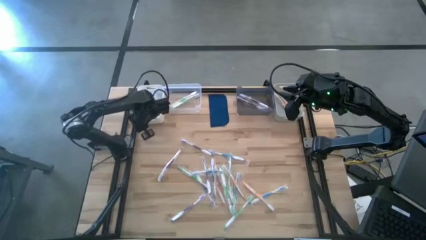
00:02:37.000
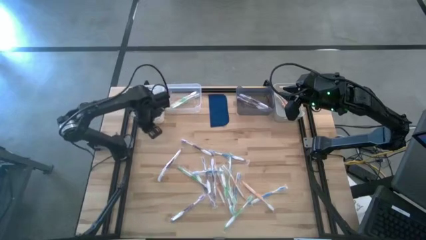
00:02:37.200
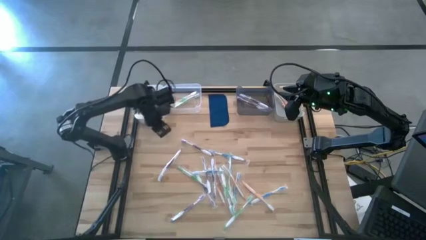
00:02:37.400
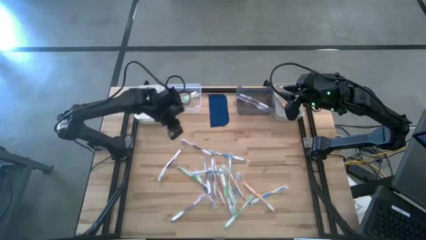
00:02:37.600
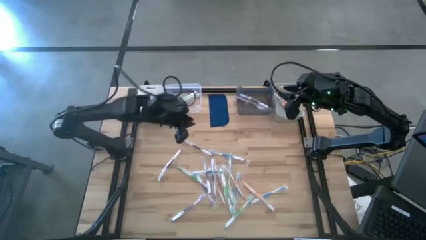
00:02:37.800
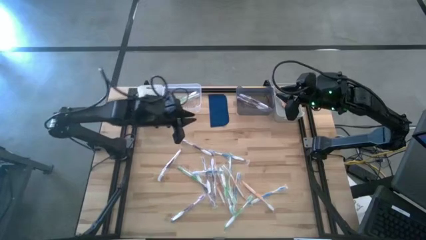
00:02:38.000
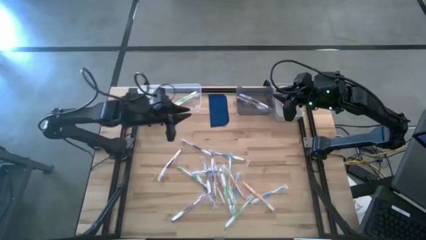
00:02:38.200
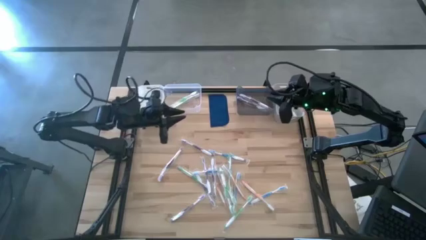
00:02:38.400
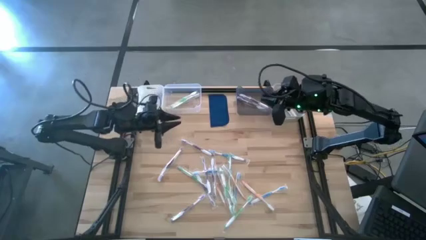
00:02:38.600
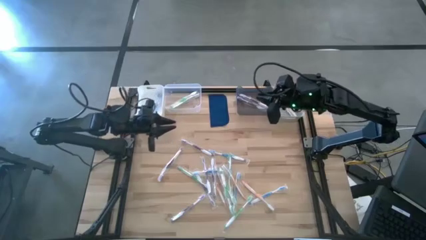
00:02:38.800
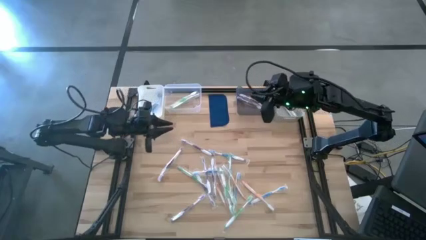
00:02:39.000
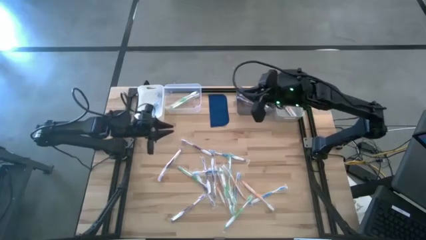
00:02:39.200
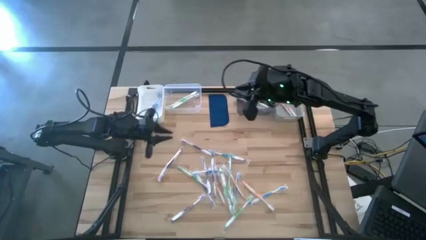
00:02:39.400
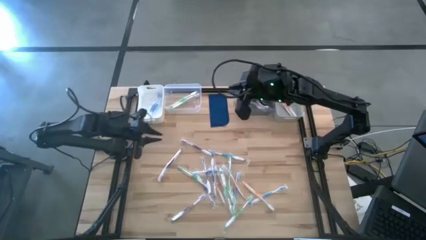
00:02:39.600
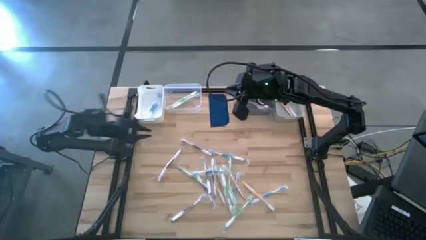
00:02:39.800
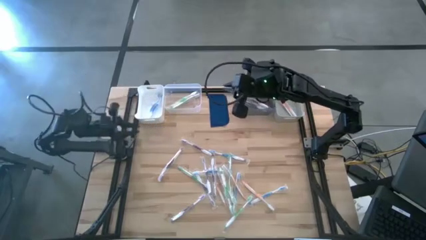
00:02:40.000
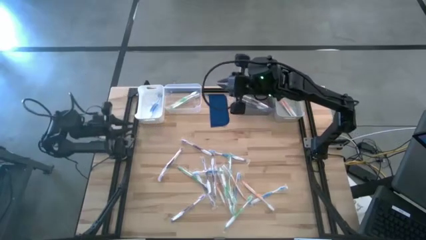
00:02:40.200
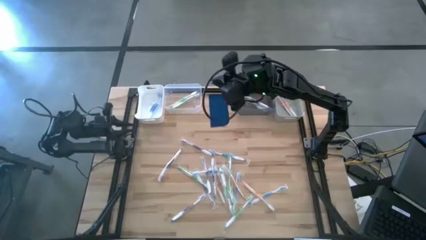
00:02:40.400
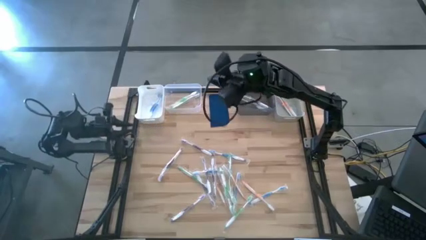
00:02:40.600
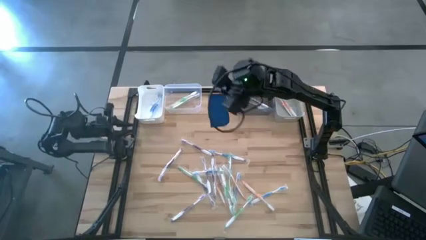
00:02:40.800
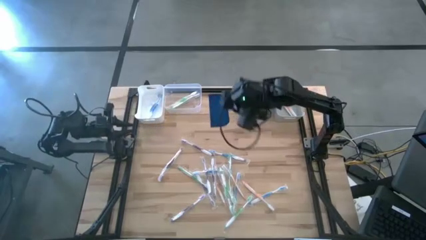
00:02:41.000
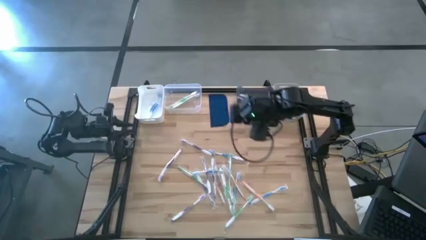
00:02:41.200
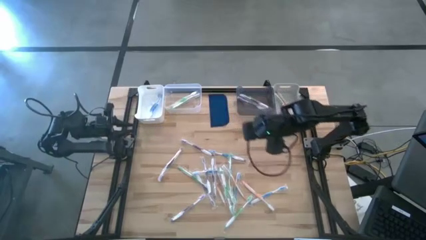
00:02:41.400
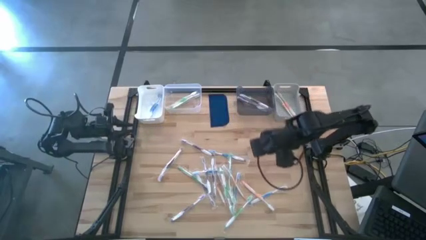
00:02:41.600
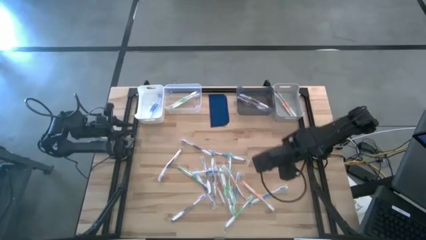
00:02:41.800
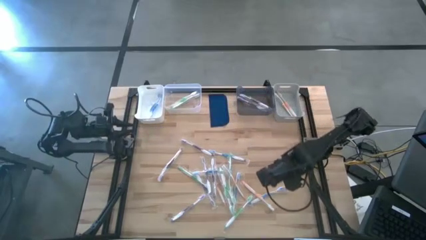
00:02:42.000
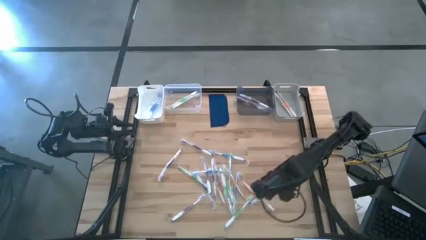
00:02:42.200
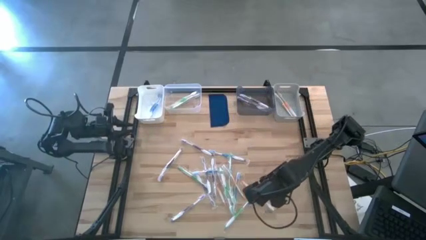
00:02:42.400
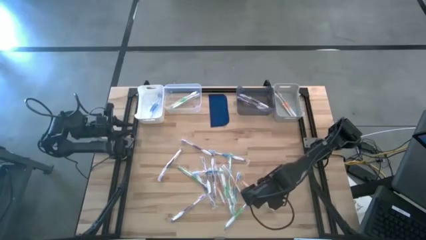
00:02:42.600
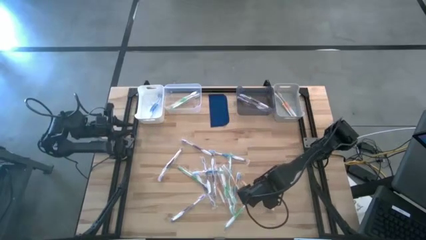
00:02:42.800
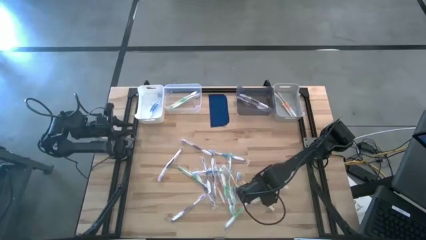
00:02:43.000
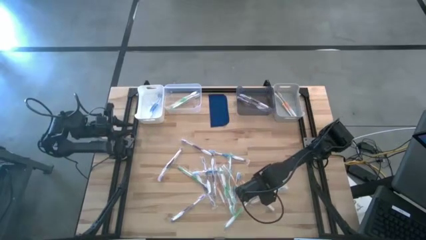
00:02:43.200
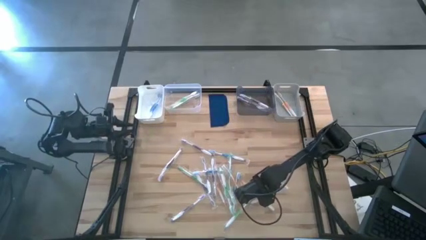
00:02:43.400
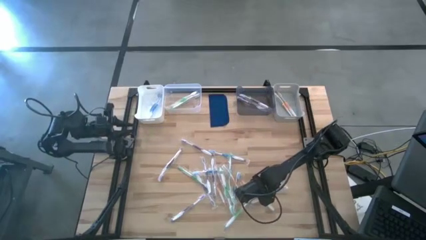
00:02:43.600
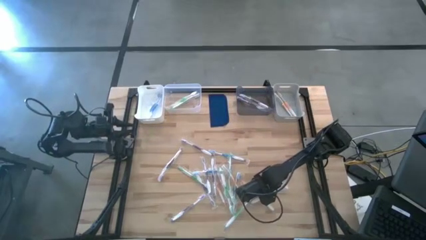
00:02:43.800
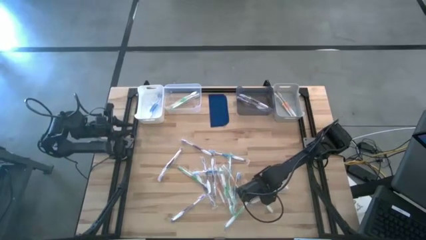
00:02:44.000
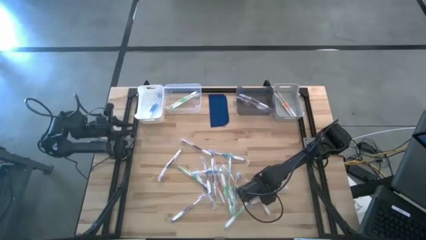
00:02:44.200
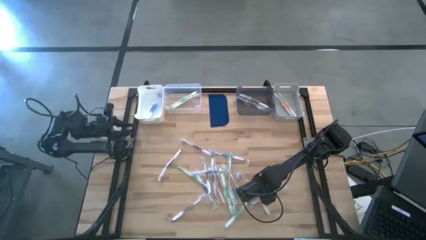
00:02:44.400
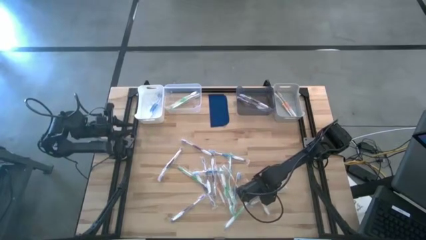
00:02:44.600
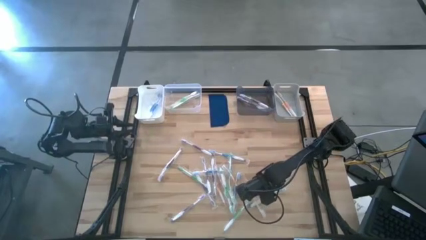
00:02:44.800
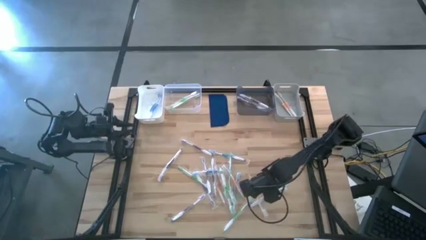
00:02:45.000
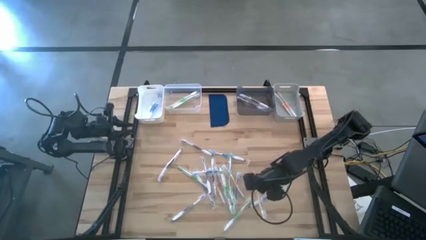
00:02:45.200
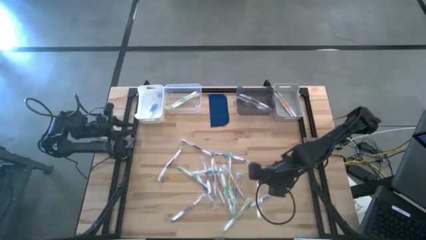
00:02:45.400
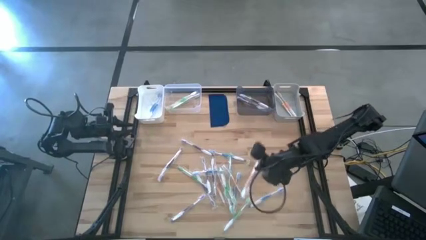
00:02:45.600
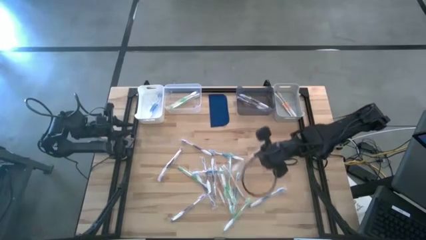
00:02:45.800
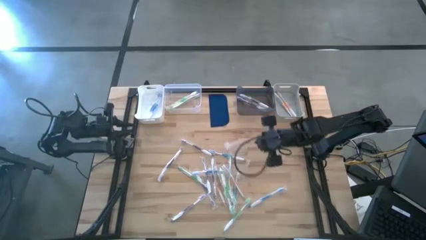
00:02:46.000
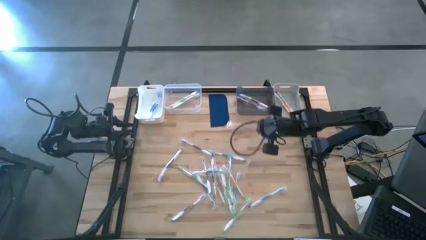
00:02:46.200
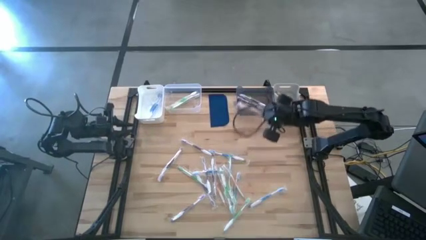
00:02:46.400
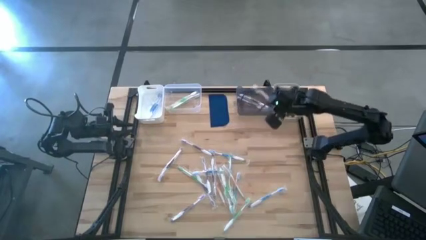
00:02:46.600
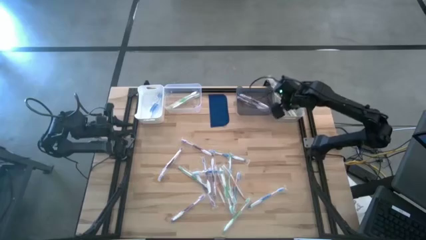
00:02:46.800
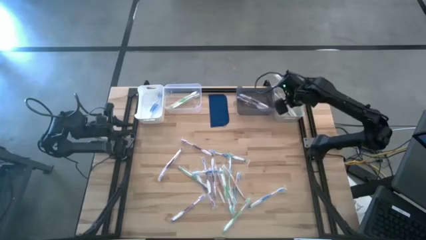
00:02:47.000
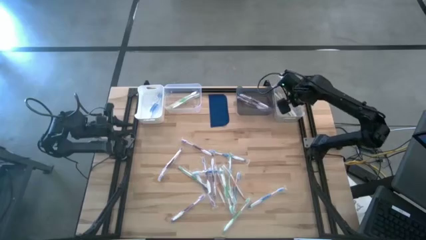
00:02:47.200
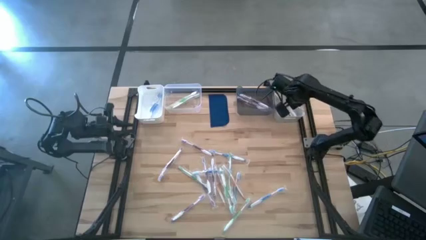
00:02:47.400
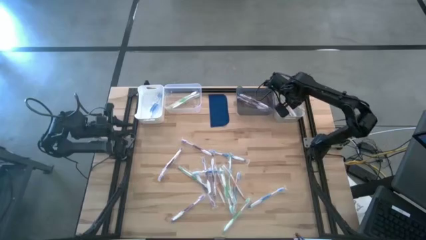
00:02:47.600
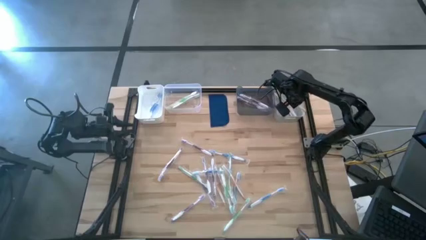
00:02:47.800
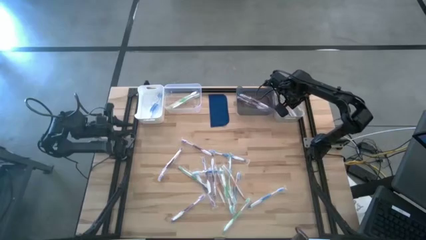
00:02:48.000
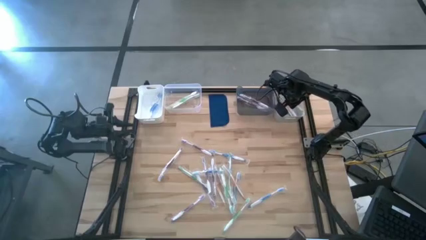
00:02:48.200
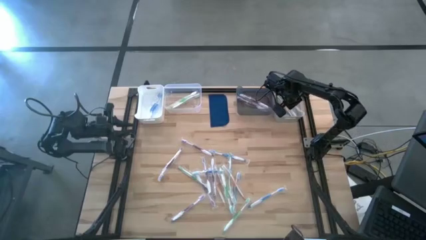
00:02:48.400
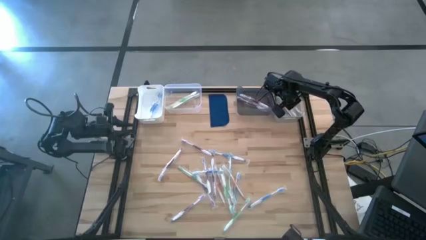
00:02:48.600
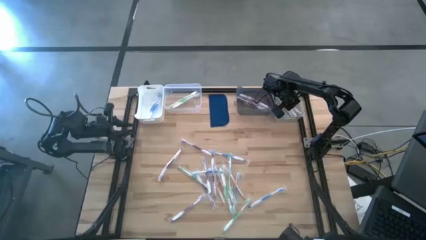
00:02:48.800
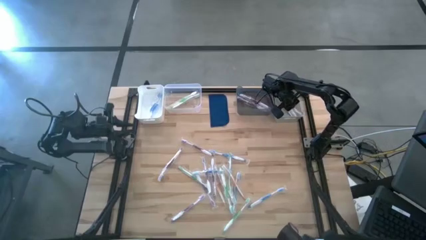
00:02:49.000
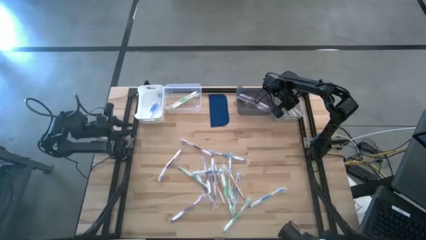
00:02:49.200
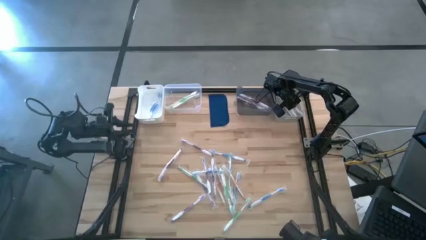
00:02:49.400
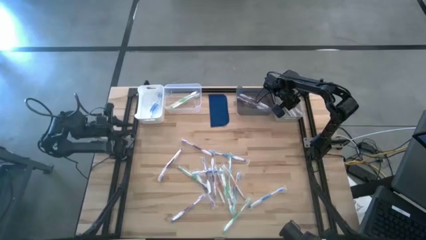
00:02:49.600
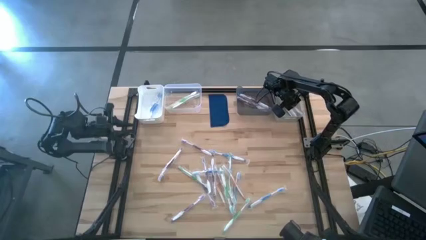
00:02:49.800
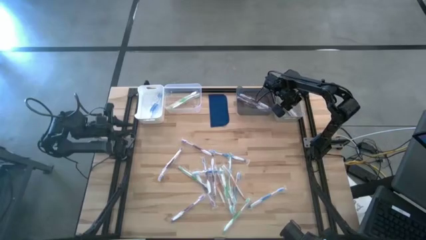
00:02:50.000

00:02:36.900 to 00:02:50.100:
Task: Pick & Place Toothbrushes
Put the orange toothbrush into the gray bin

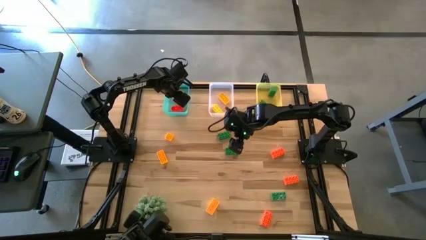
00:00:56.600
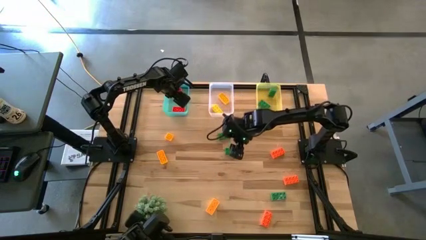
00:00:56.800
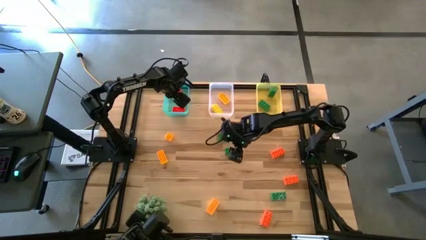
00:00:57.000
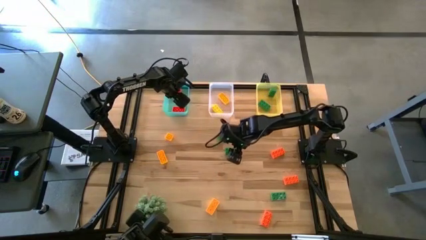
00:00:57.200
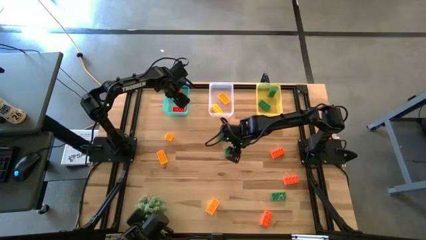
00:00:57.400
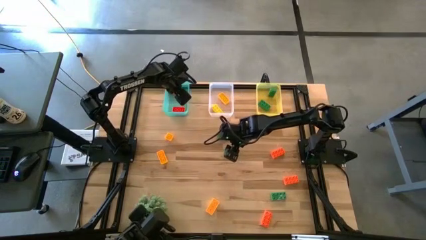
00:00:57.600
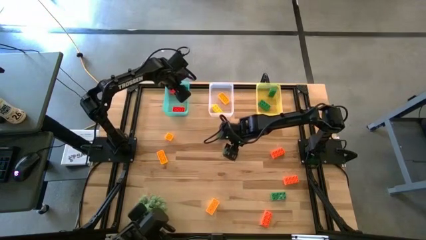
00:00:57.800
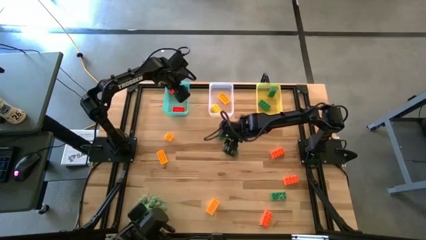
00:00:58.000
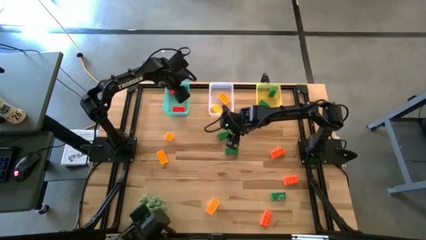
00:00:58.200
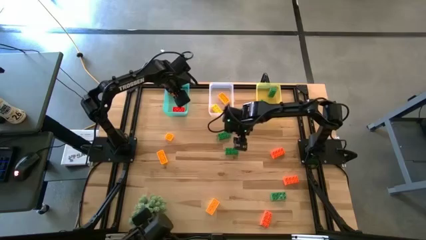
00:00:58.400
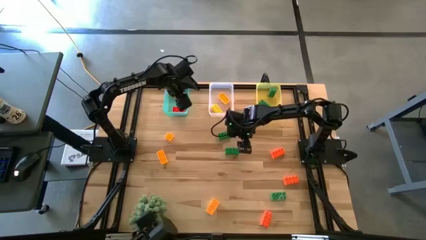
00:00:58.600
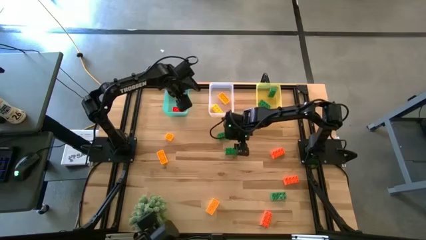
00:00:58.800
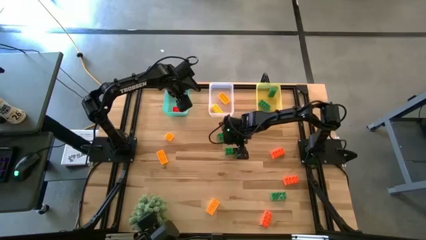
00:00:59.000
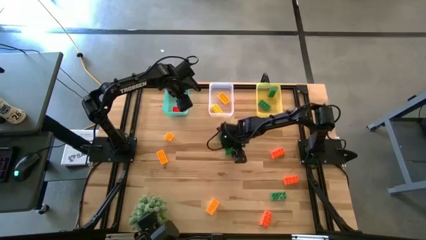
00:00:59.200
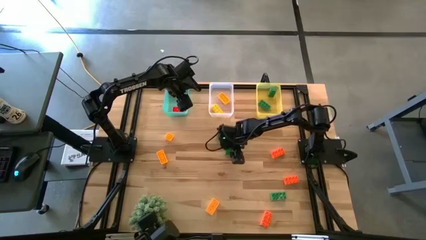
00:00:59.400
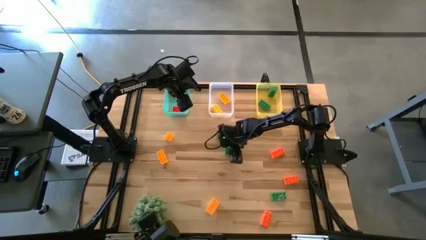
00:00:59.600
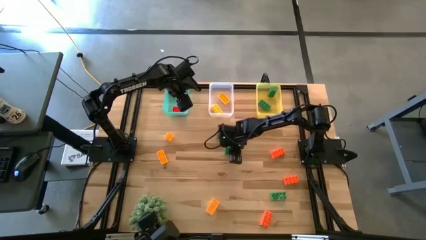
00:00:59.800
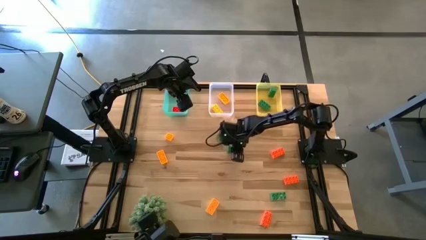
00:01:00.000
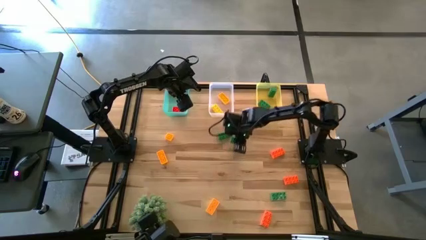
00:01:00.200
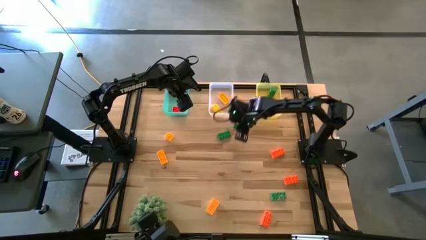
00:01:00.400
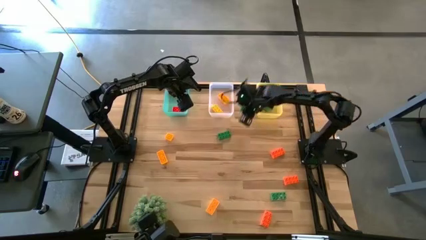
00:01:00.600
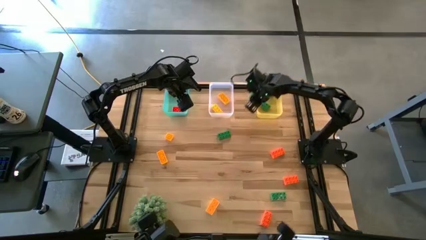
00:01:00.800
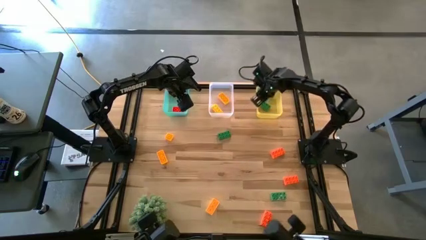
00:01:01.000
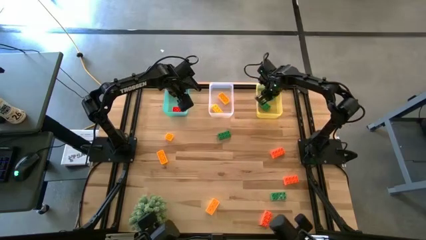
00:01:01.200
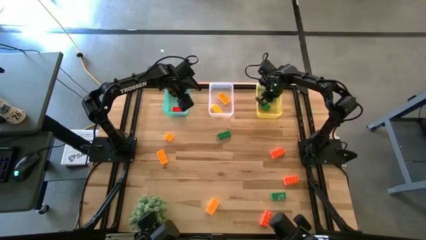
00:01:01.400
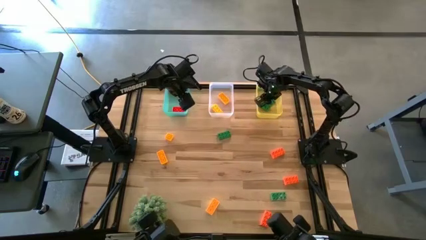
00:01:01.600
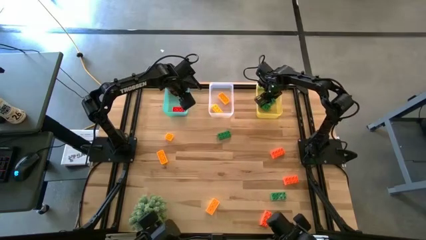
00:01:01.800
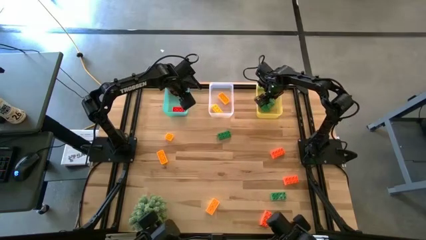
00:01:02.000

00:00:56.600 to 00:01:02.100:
Task: Sort & place blocks by color
Put the green game piece into the yellow bin
